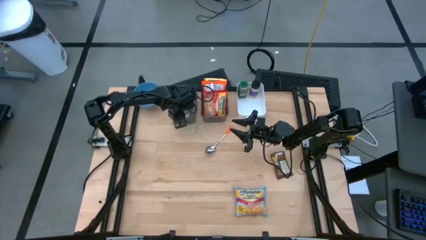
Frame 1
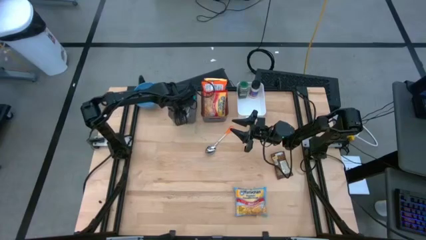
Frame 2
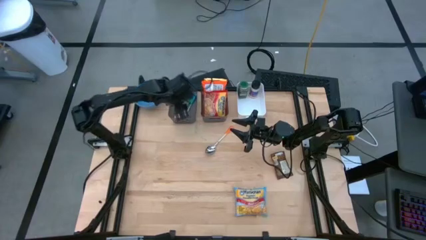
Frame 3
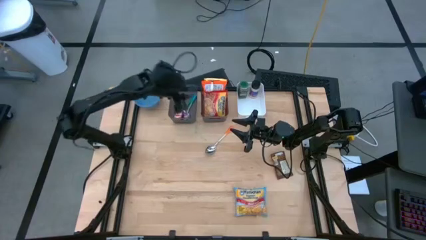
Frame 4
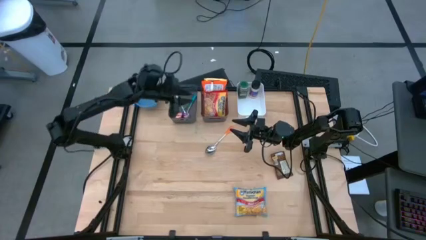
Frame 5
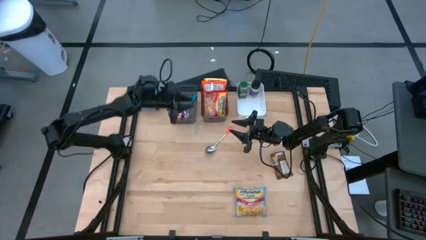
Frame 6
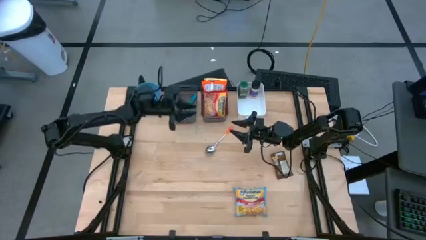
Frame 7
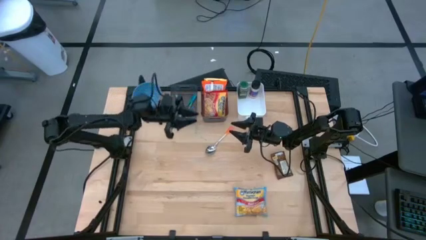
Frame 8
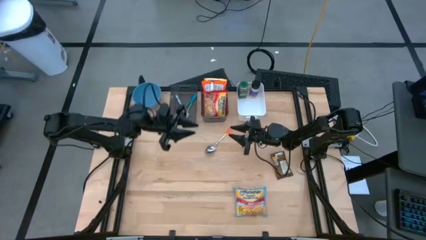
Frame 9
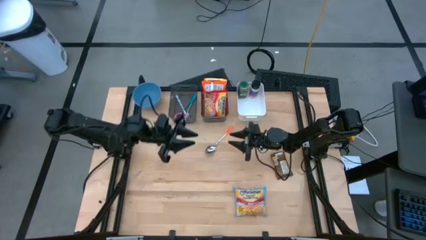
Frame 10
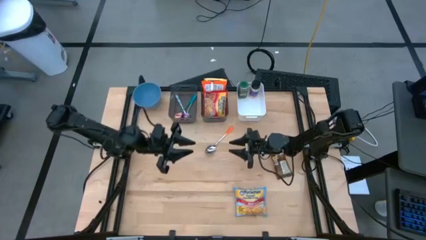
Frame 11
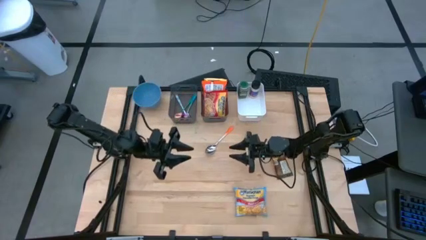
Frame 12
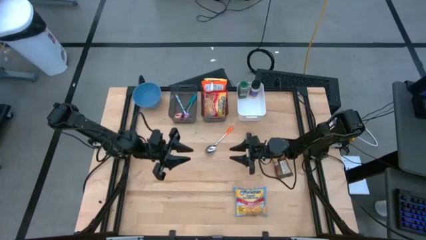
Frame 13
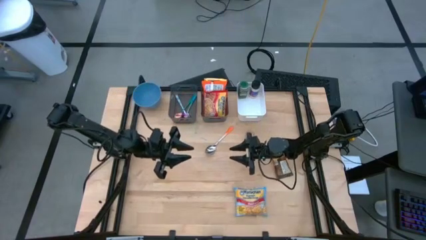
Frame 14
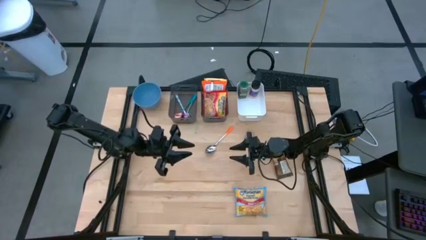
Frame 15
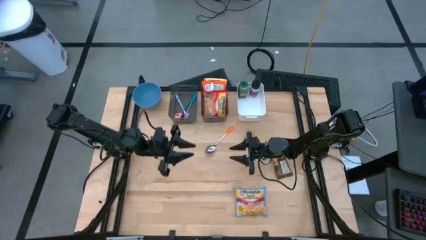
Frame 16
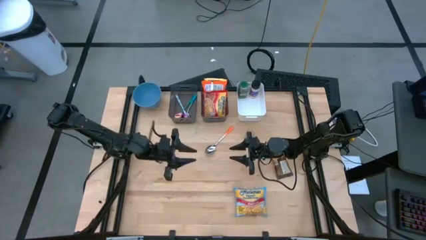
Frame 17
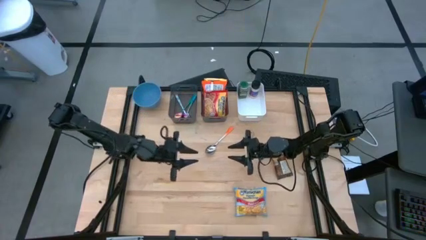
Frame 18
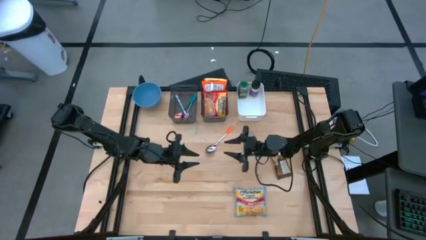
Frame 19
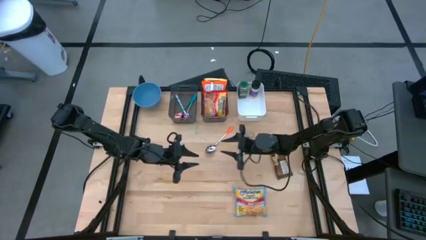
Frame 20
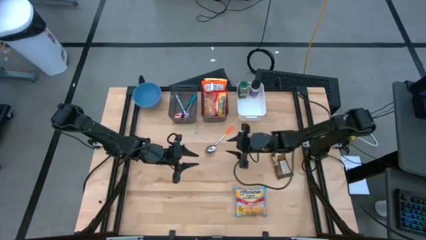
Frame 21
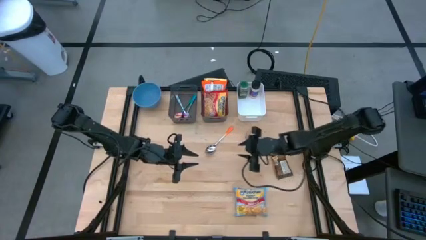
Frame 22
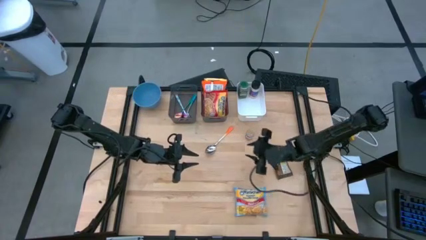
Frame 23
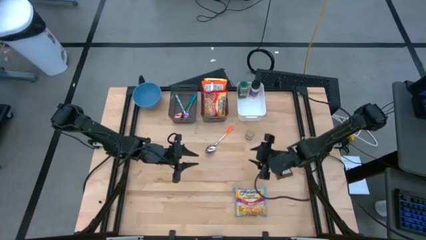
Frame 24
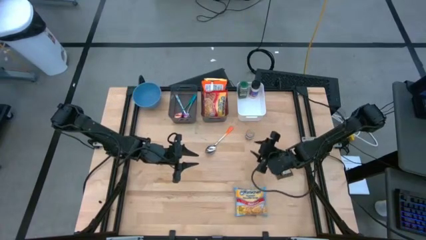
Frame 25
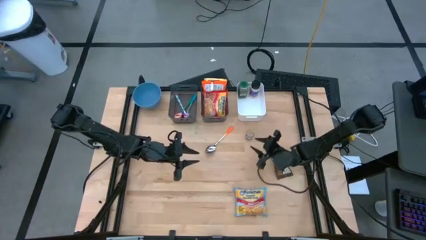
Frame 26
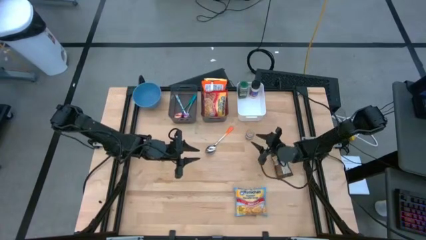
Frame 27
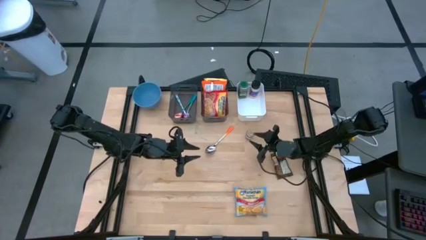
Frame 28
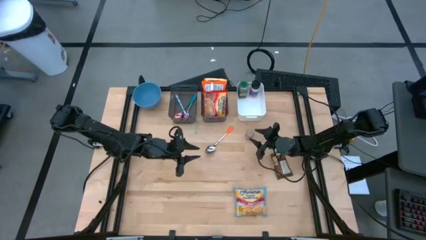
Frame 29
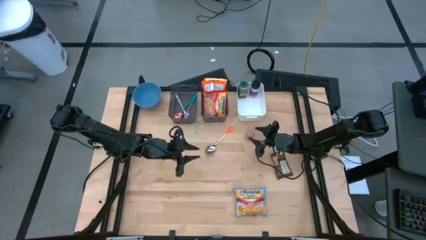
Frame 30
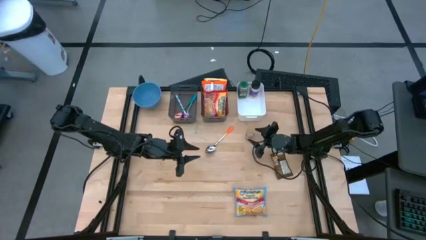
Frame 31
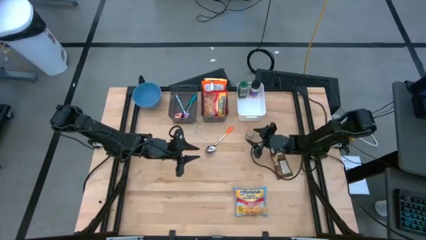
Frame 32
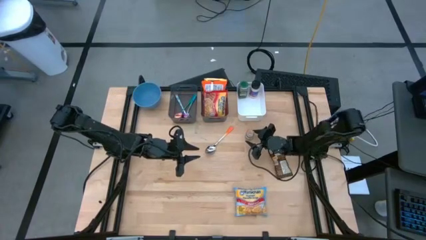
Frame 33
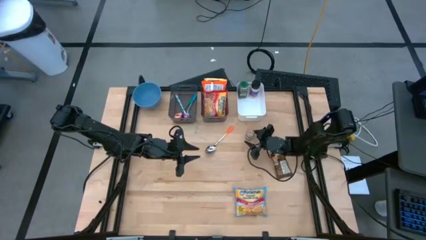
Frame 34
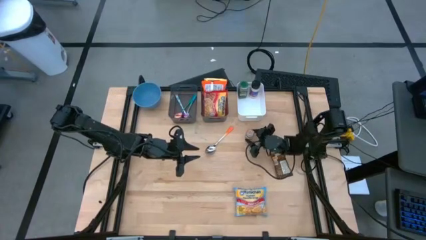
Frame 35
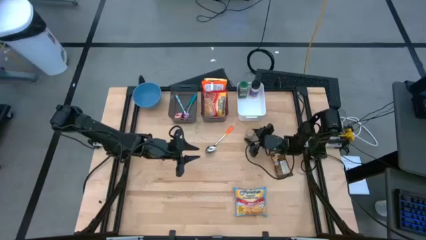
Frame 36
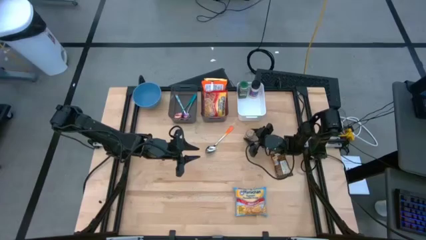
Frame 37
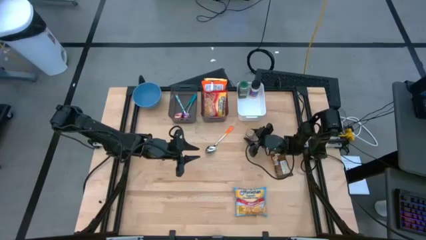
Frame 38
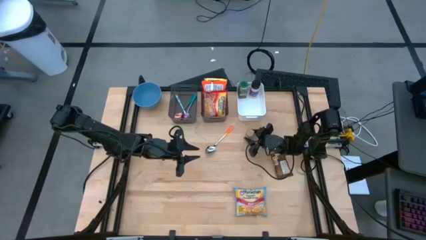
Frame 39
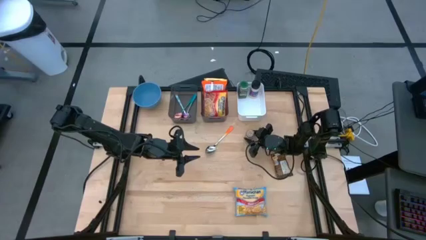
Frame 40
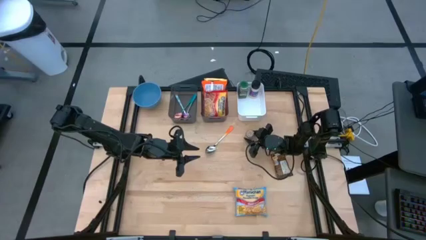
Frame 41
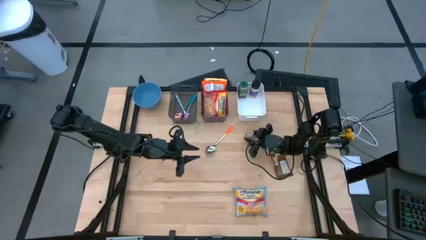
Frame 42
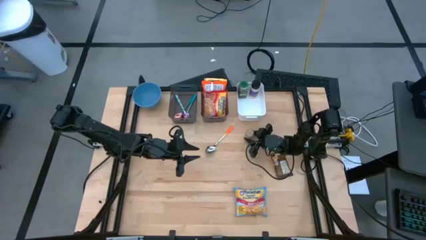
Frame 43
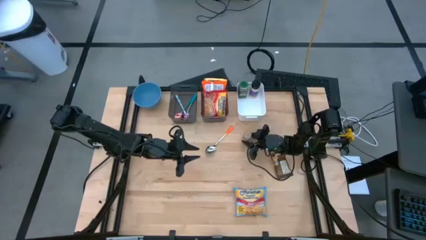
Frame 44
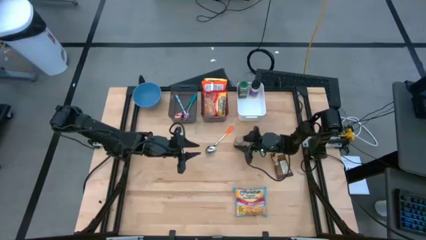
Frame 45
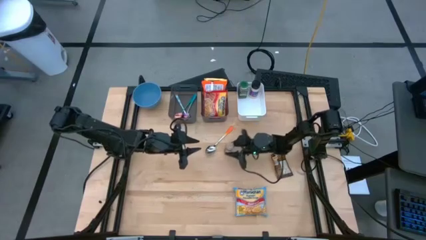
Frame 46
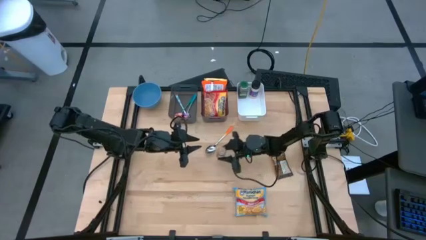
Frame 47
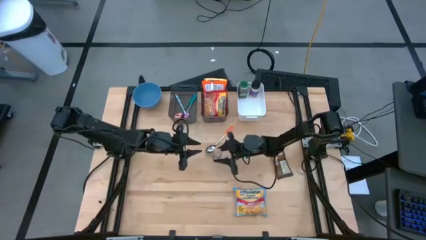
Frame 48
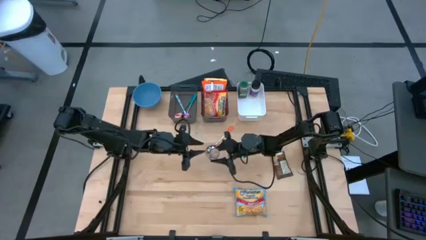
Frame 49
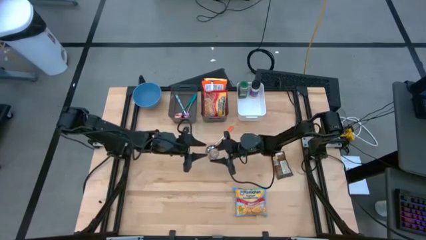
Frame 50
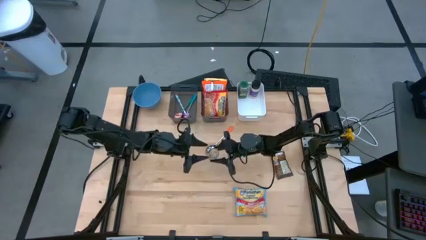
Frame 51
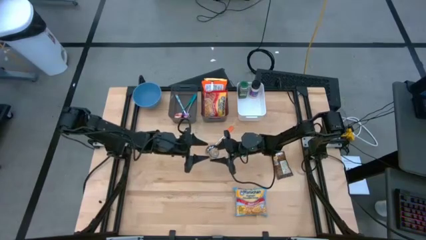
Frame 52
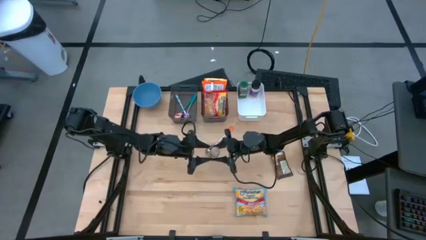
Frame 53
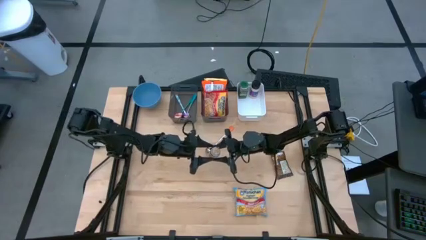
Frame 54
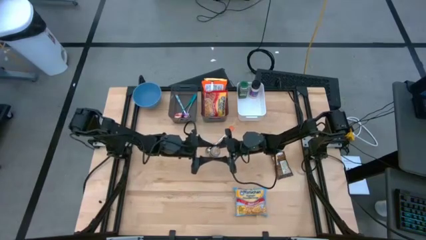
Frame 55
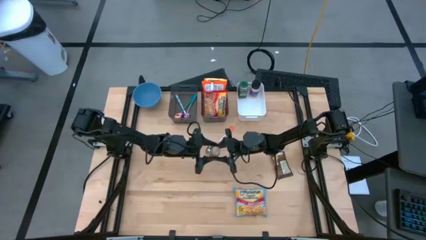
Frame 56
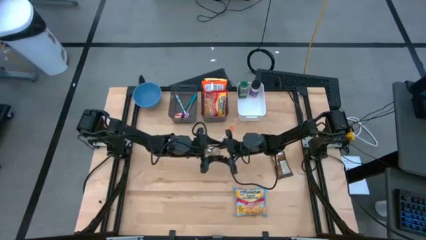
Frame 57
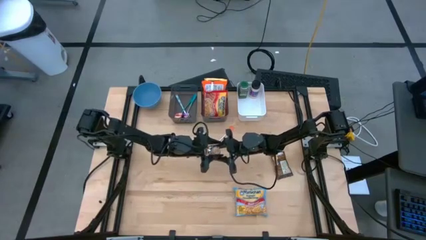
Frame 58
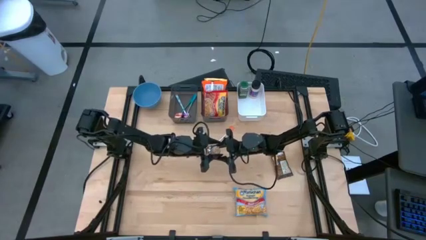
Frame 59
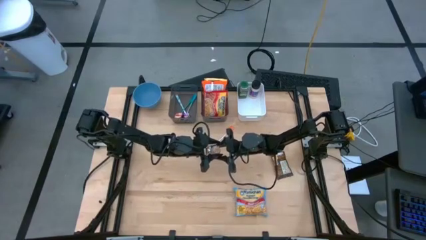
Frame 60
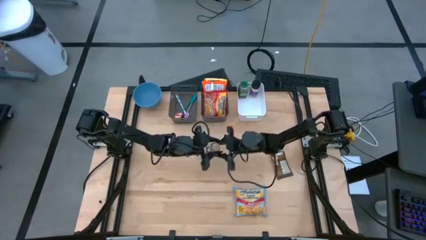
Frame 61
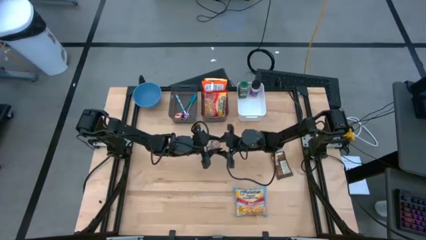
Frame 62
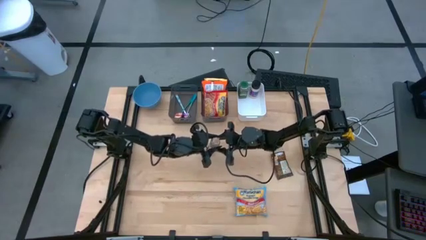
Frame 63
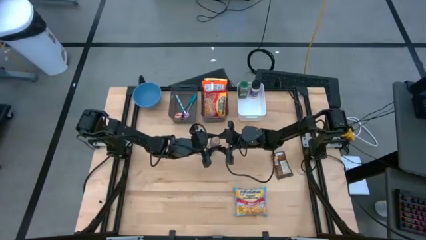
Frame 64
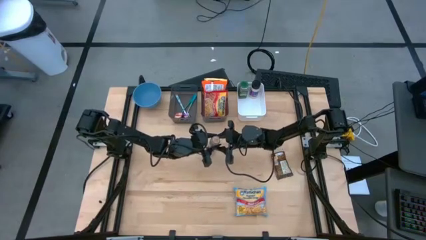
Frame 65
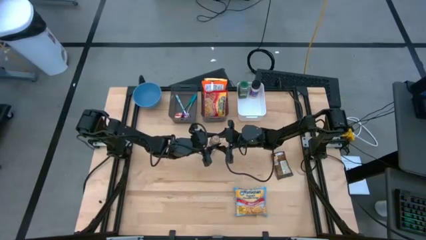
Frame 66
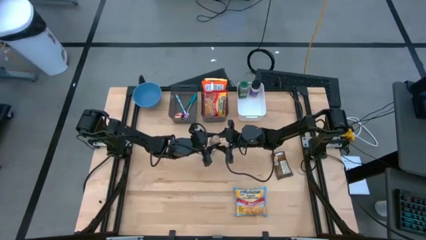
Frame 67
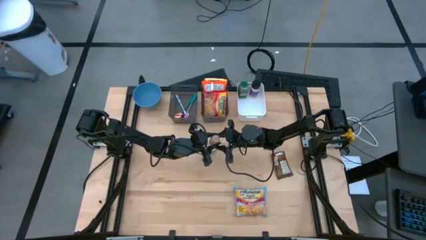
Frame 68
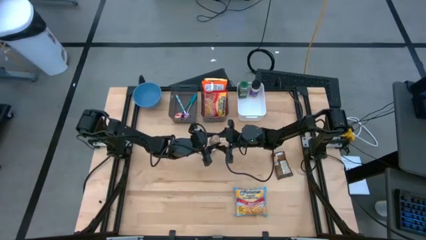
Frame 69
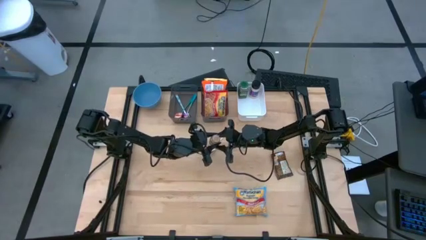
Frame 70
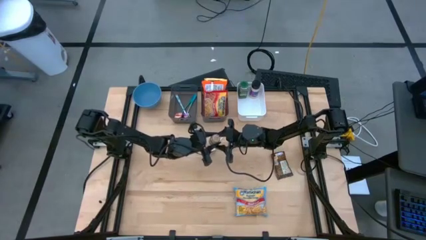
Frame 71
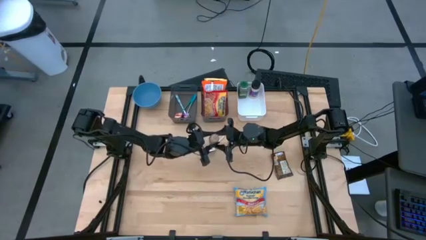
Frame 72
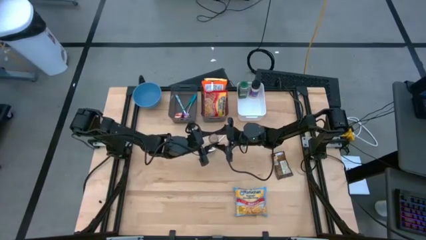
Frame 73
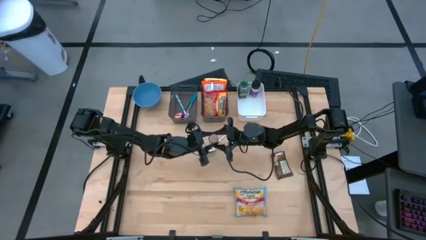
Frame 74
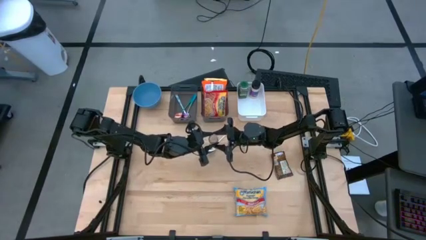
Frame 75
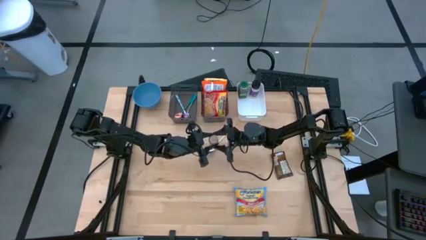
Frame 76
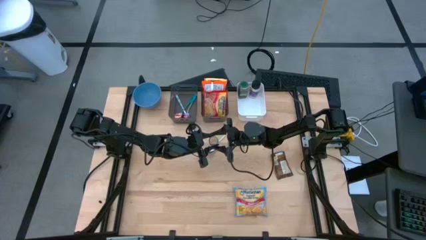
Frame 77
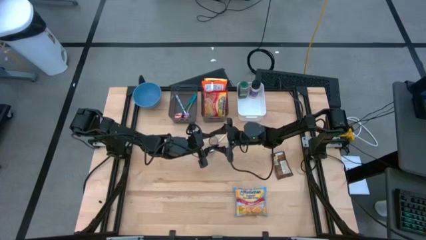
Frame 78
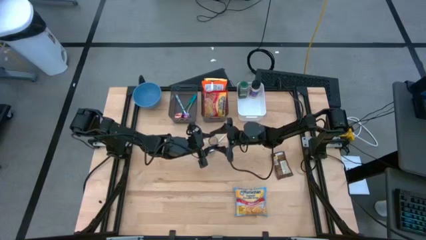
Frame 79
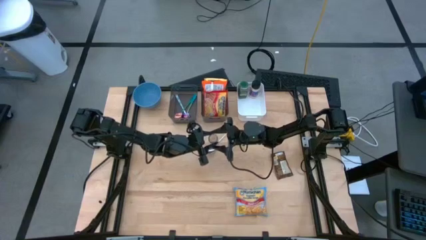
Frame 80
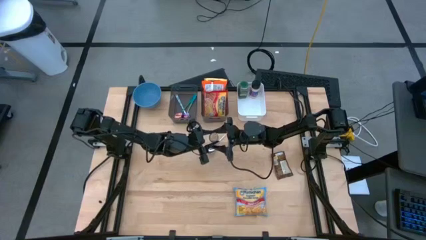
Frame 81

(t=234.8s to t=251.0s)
Task: Pick & Place Food Item
Put the brown seasoning bottle into the white bin
